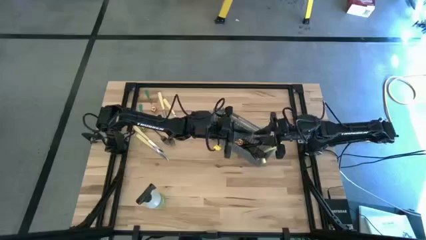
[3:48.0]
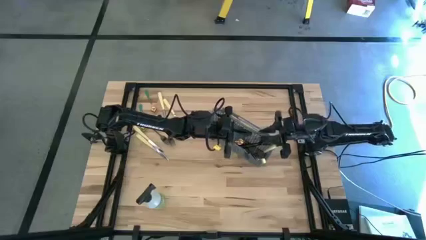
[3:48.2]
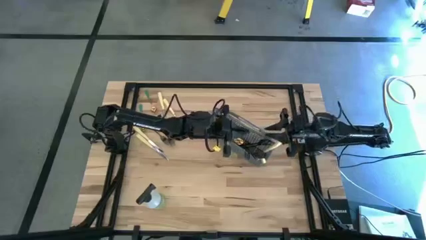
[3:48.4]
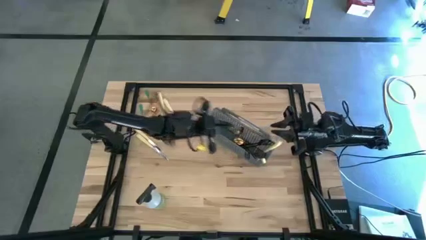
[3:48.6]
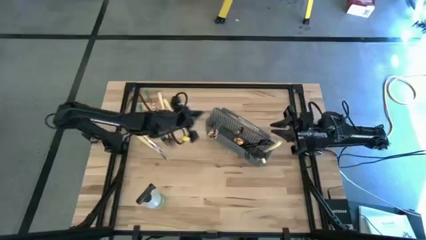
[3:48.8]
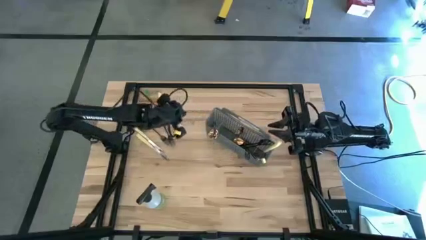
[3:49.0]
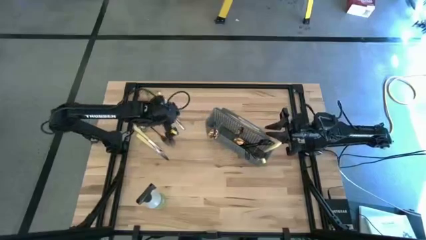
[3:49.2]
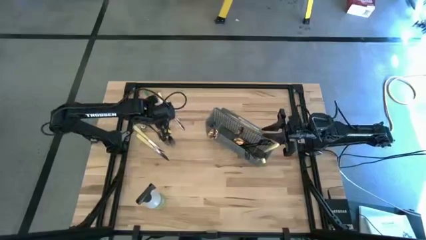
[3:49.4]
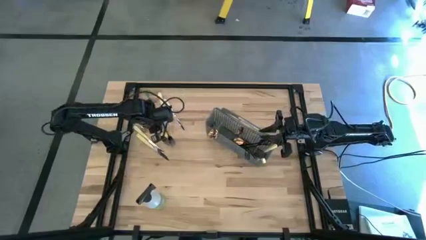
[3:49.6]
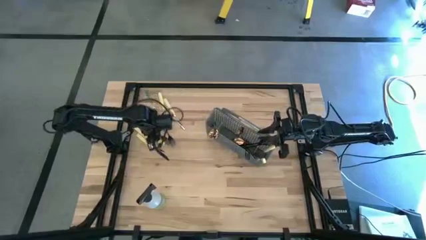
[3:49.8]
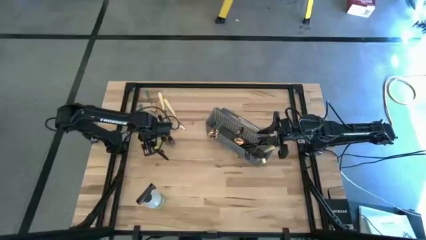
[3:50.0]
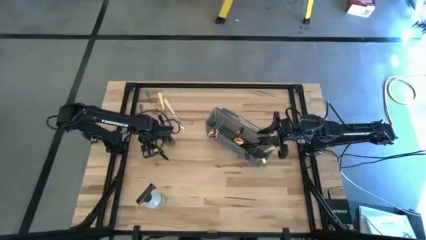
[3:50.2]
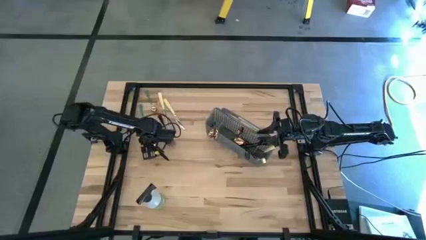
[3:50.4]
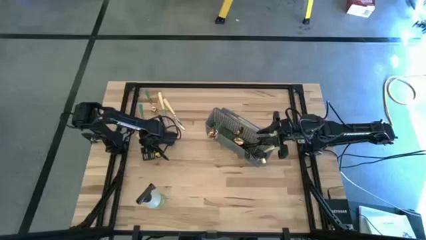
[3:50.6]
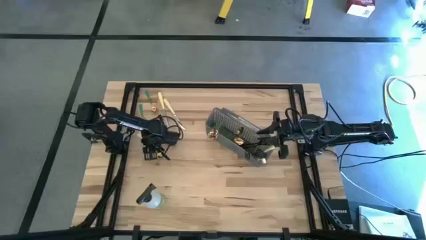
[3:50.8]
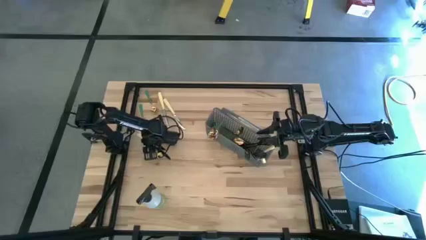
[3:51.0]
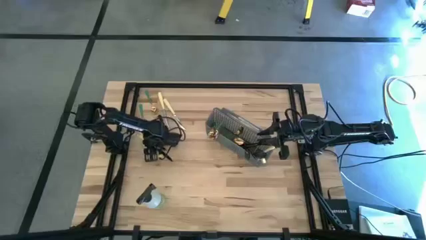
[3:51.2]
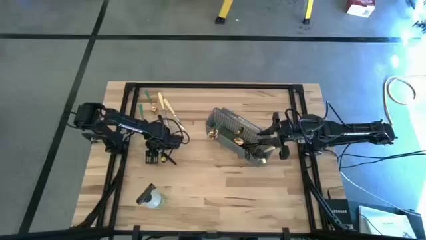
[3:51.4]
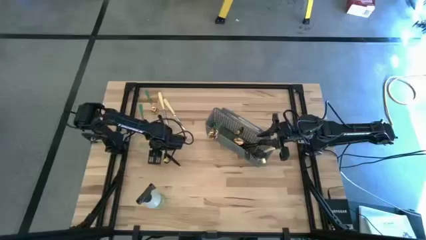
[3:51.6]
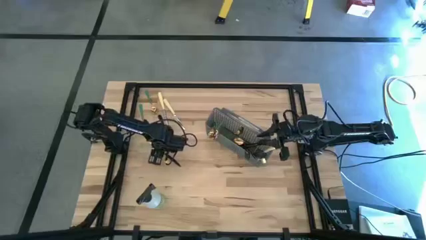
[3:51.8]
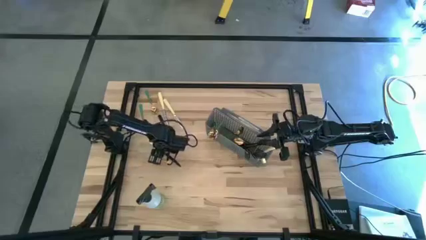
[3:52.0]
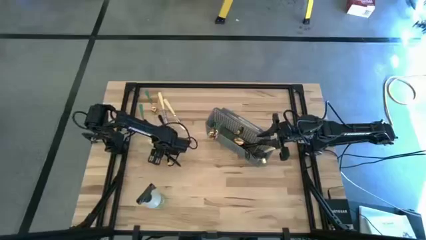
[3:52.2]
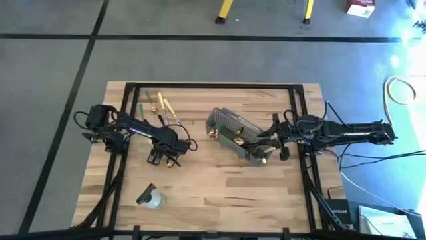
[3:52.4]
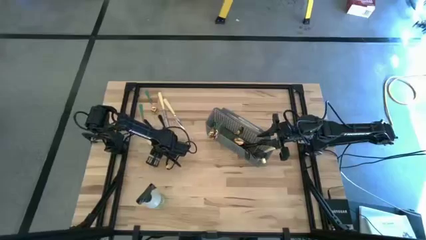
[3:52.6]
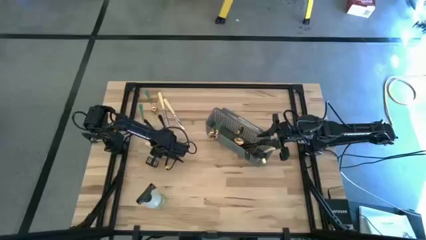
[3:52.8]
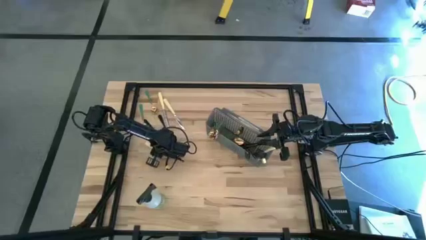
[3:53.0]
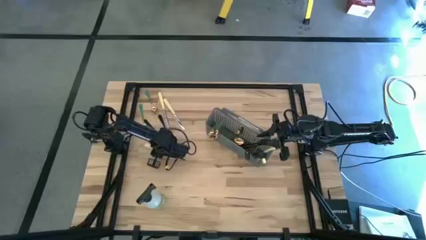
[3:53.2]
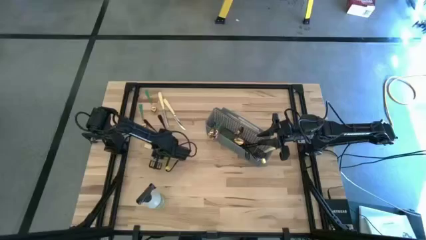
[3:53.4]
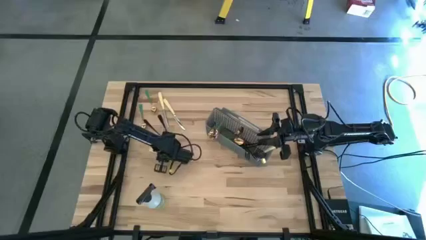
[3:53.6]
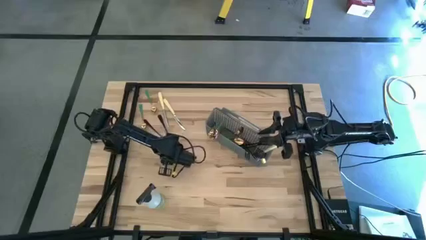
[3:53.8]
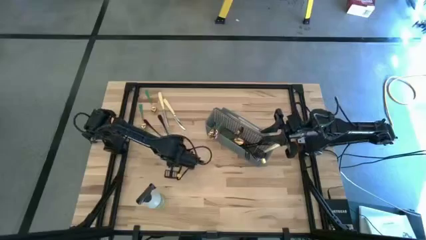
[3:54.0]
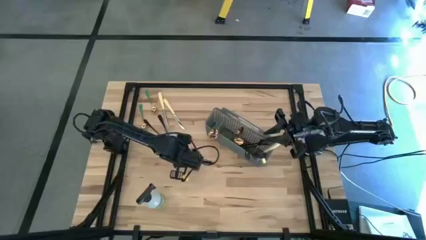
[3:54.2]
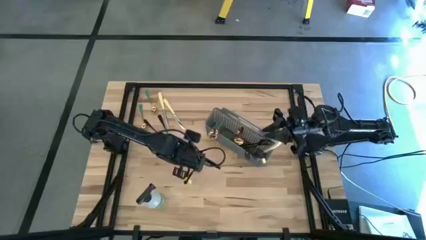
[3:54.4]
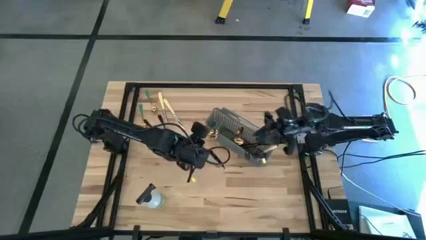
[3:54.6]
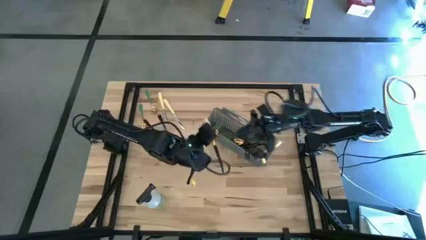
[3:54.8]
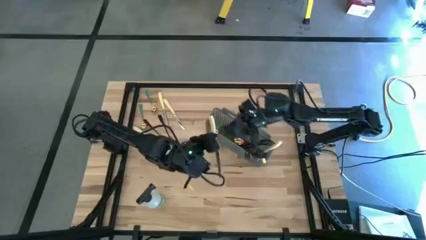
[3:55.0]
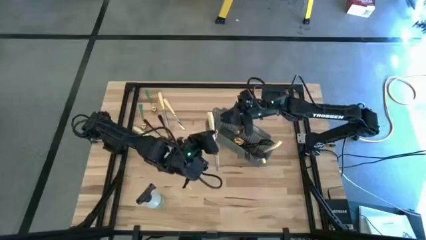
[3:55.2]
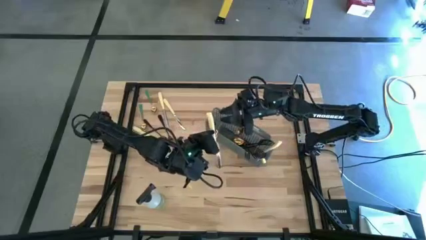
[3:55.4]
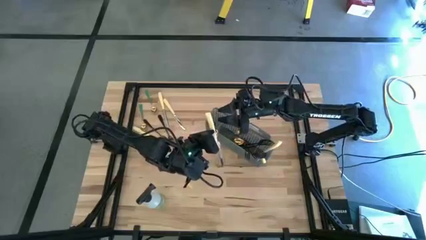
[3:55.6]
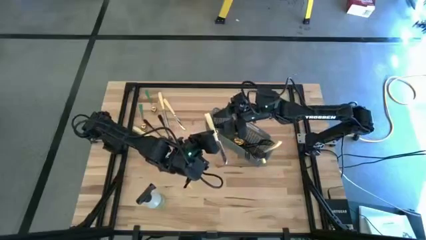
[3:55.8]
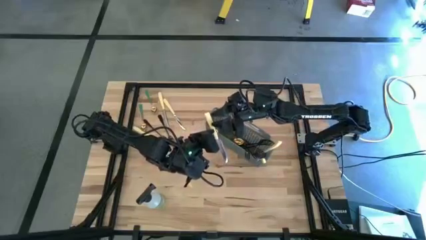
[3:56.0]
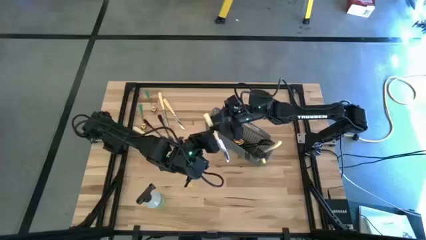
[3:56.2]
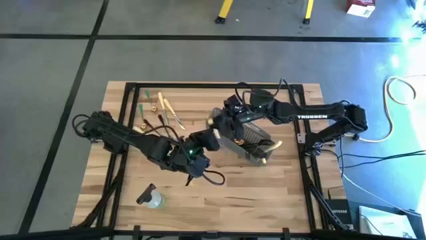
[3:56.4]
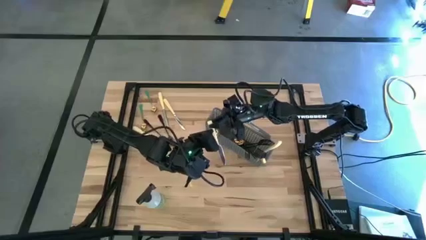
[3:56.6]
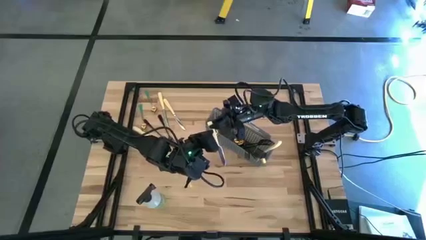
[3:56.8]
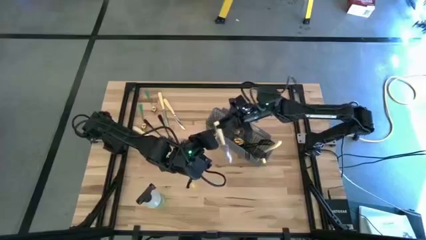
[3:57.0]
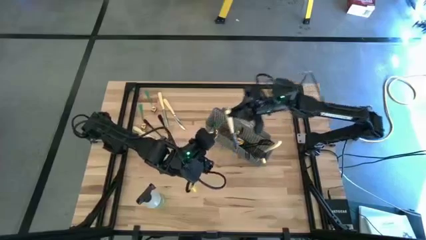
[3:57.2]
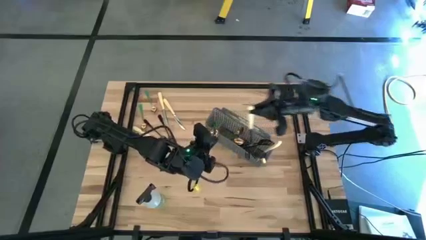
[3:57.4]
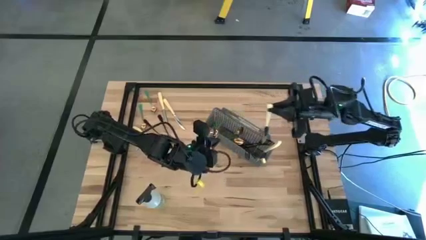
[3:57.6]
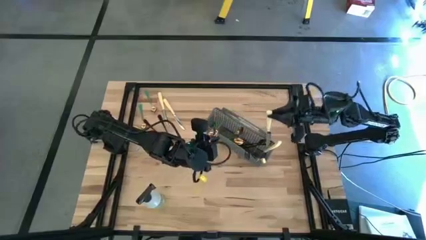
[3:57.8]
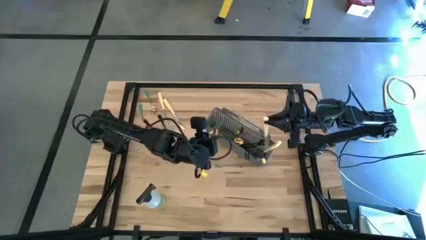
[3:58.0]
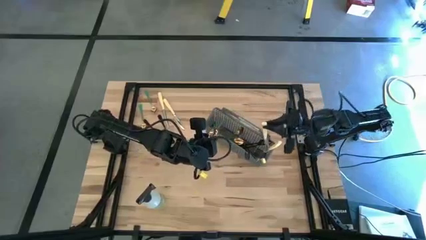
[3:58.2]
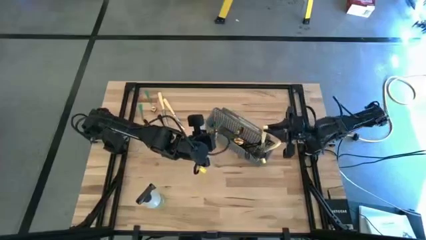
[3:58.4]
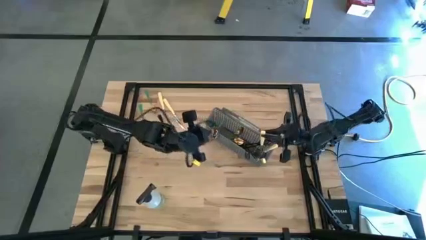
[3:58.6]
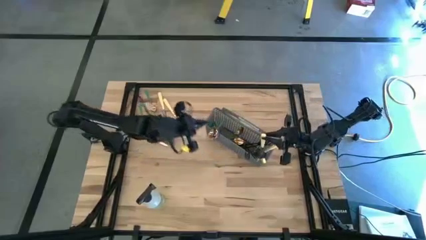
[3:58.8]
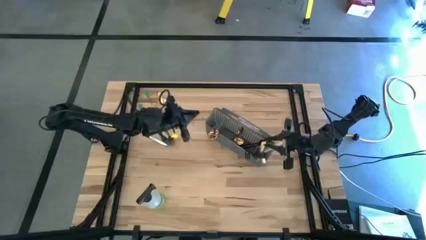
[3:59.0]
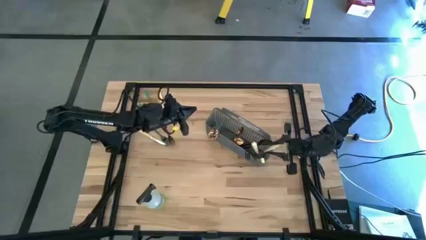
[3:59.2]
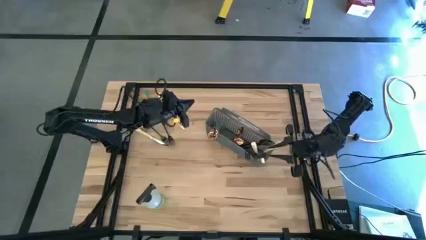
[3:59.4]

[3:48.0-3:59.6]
Task: Sort silverware
Put the silver knife into the cutlery rack

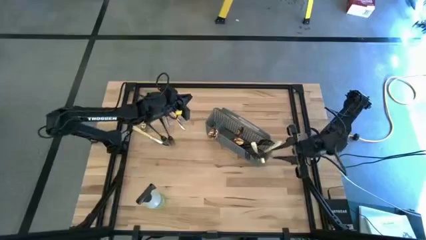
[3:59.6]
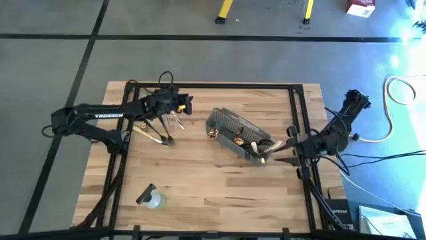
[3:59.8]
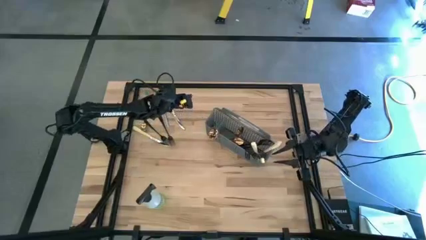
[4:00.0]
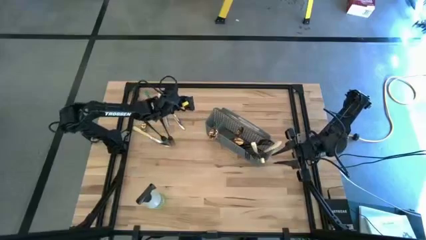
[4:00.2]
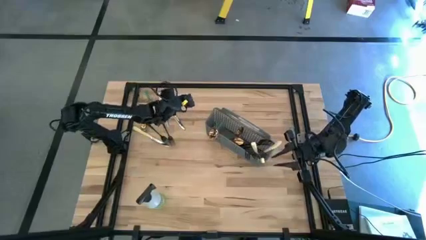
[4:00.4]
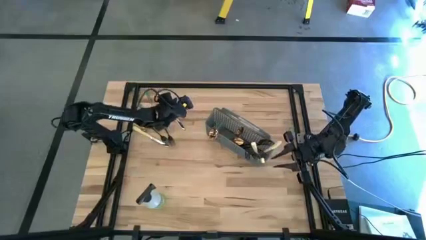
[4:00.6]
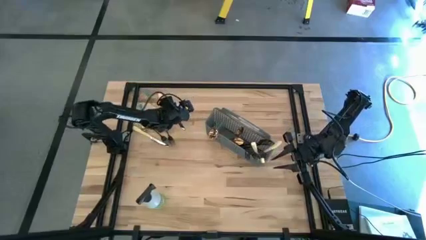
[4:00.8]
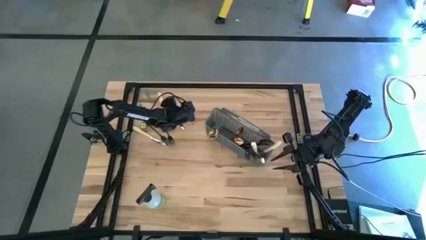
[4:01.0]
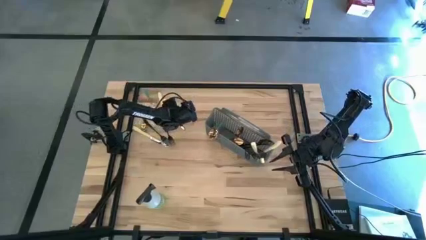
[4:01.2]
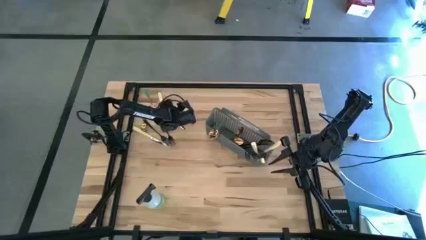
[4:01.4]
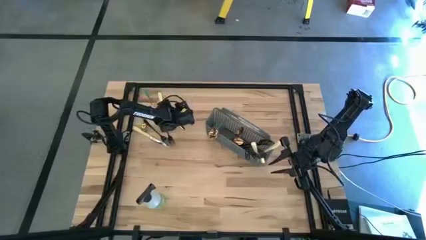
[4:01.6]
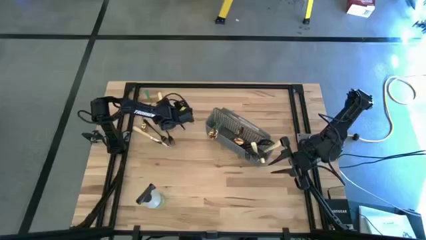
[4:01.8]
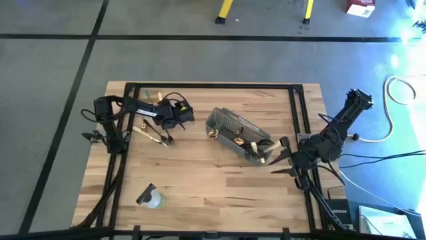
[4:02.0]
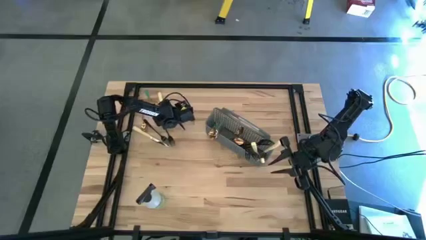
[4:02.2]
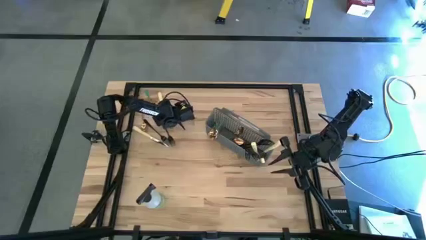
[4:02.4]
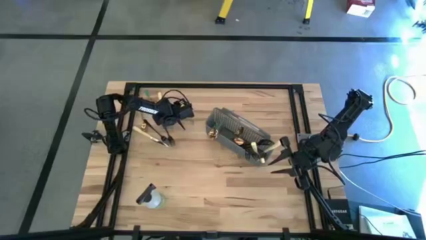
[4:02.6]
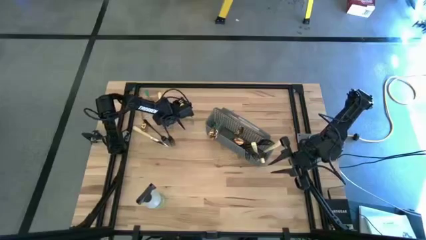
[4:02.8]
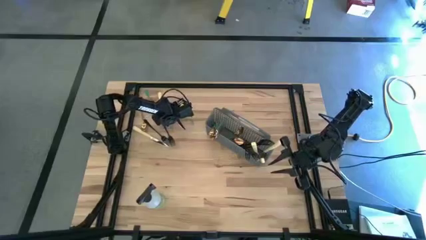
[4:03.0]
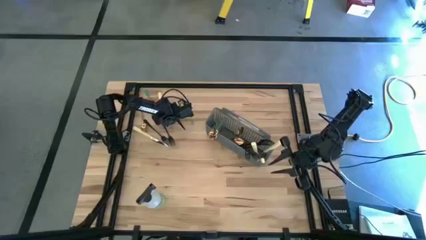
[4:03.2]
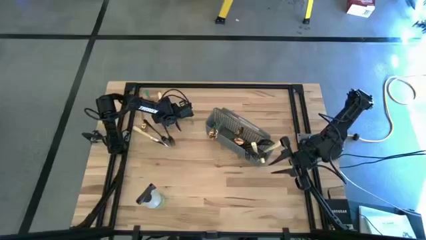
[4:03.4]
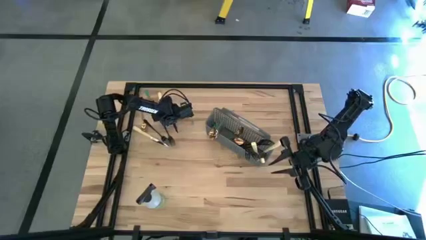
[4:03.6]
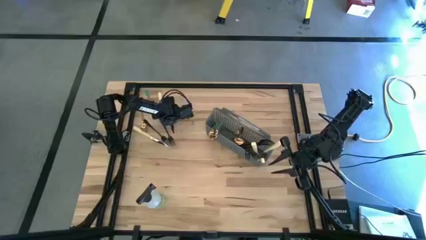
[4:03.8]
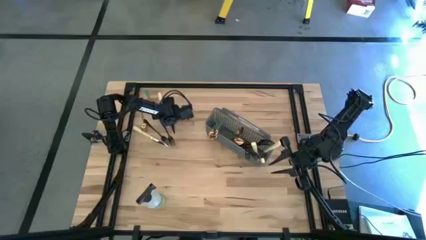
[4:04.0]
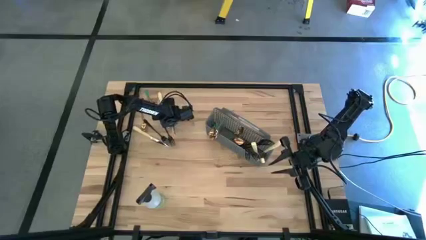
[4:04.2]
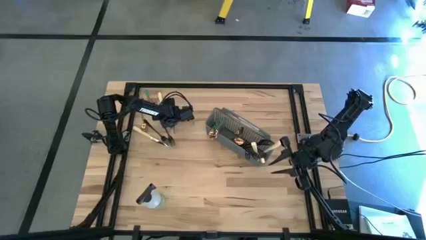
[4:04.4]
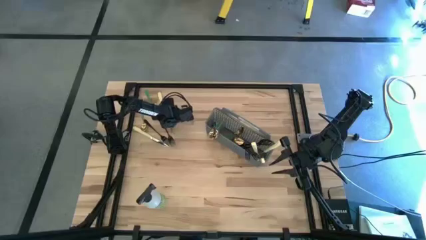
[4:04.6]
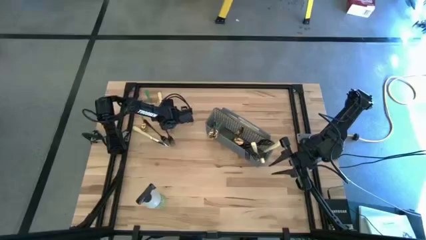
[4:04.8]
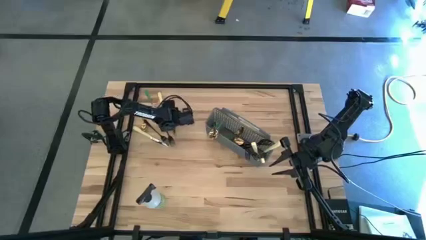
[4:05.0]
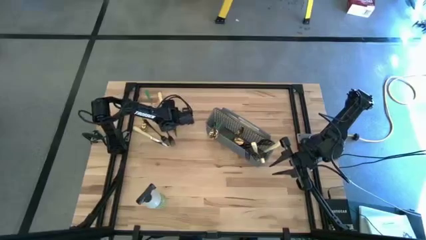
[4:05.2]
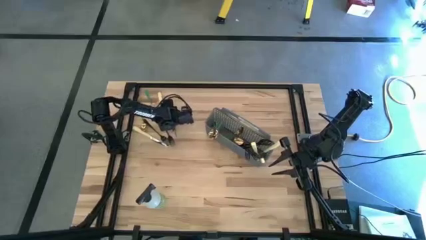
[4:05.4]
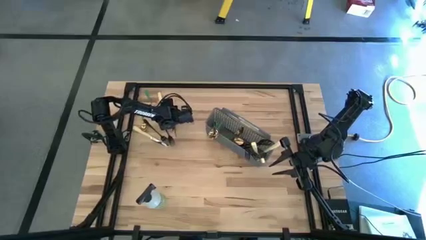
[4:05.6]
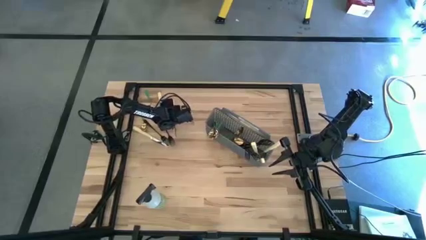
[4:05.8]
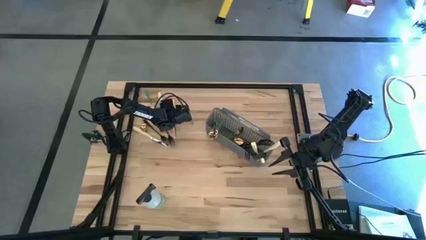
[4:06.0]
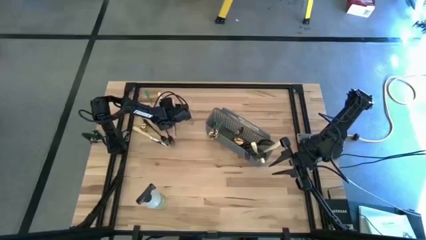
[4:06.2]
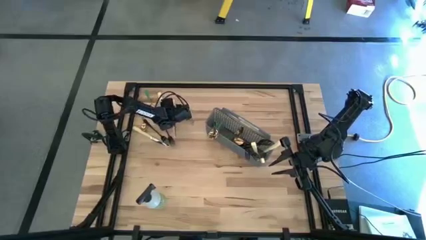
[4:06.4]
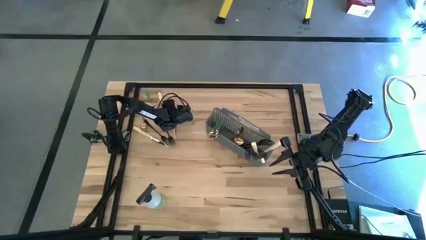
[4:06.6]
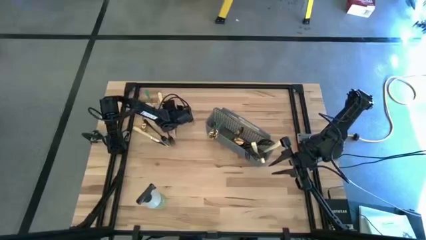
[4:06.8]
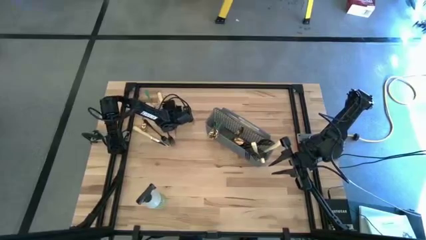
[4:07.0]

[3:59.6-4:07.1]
Put the silver knife into the cutlery rack
